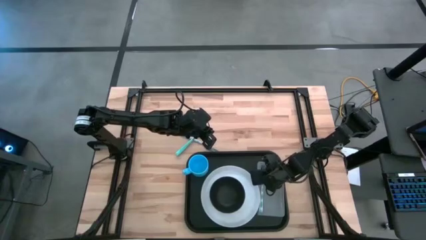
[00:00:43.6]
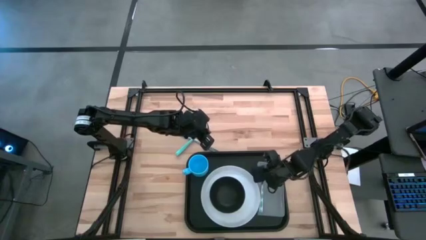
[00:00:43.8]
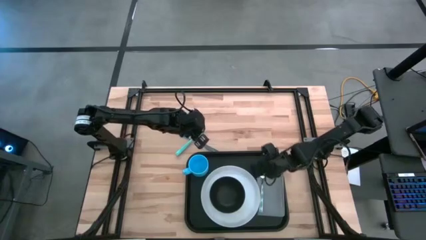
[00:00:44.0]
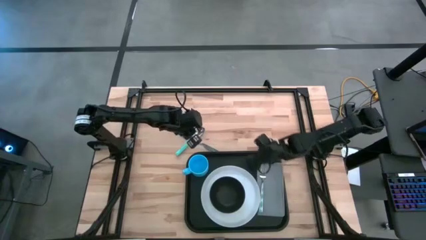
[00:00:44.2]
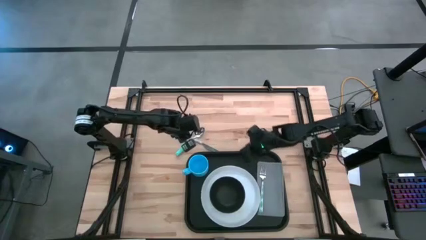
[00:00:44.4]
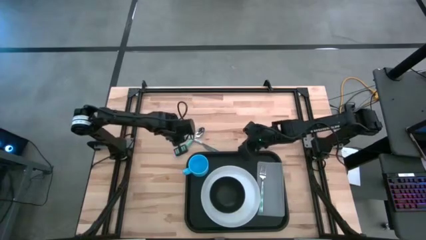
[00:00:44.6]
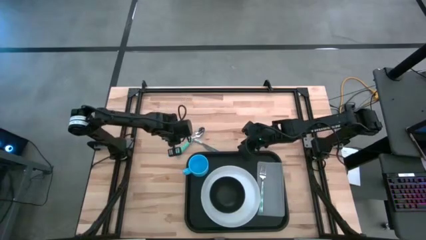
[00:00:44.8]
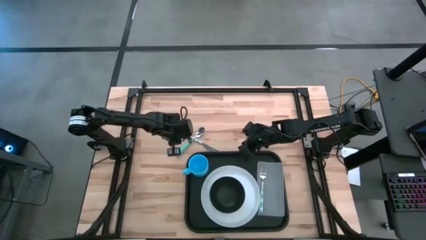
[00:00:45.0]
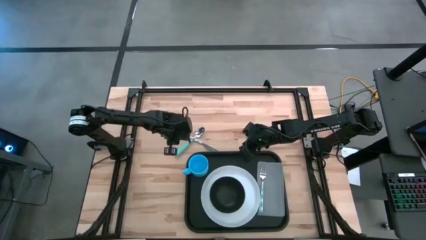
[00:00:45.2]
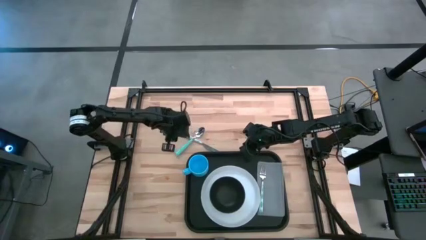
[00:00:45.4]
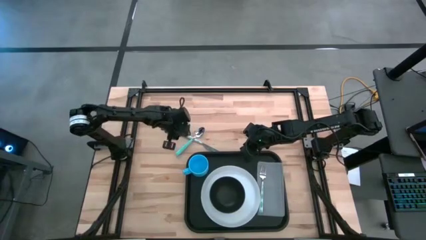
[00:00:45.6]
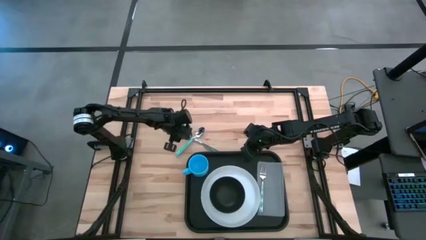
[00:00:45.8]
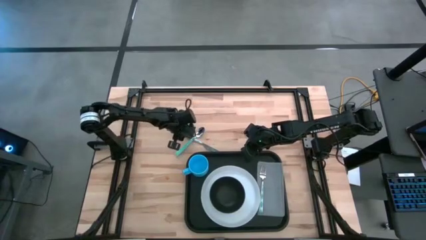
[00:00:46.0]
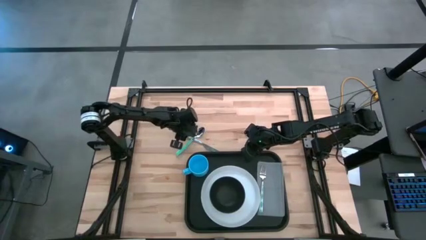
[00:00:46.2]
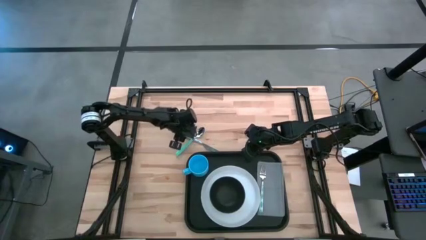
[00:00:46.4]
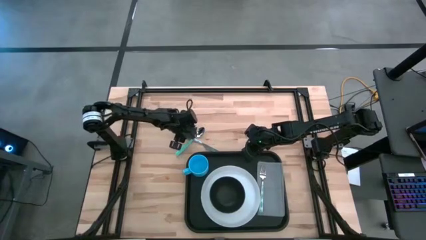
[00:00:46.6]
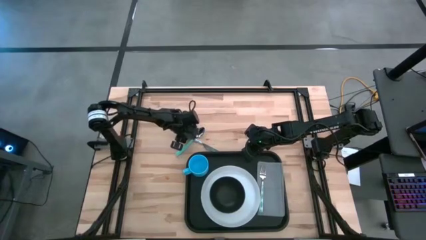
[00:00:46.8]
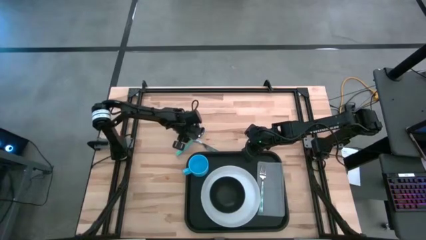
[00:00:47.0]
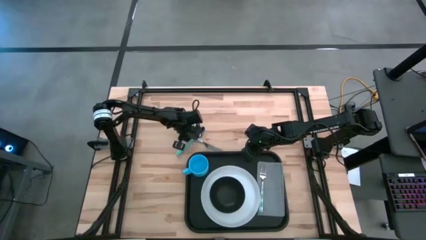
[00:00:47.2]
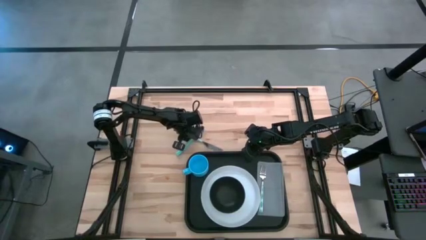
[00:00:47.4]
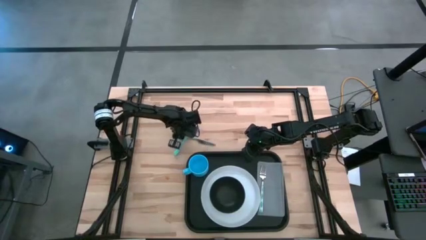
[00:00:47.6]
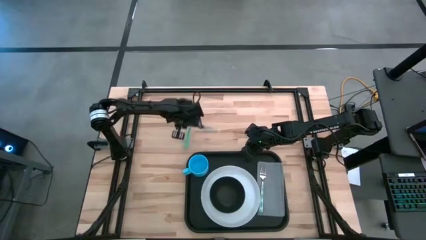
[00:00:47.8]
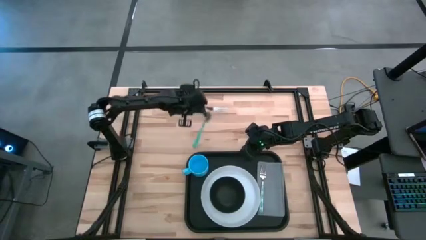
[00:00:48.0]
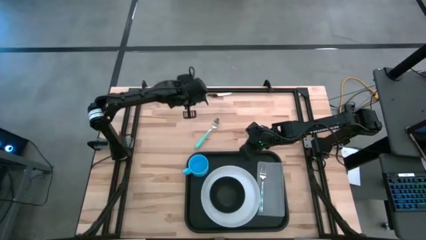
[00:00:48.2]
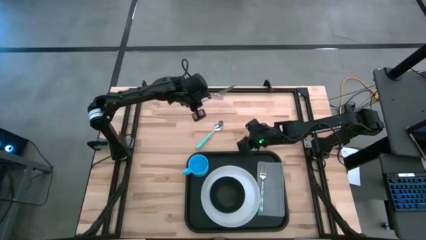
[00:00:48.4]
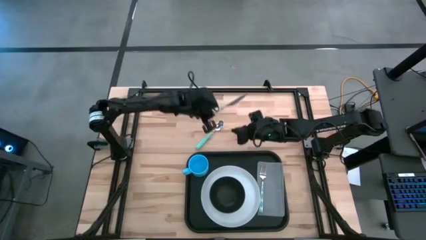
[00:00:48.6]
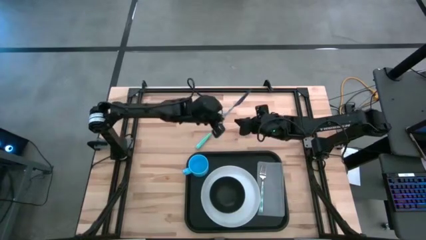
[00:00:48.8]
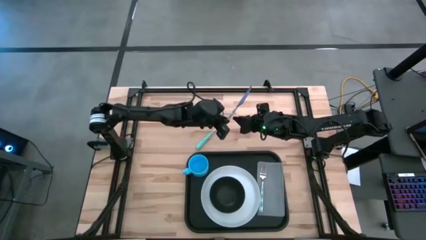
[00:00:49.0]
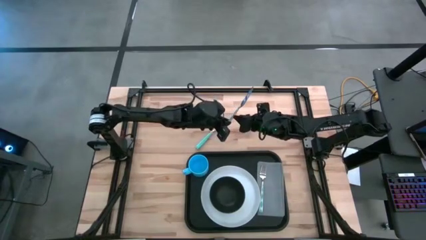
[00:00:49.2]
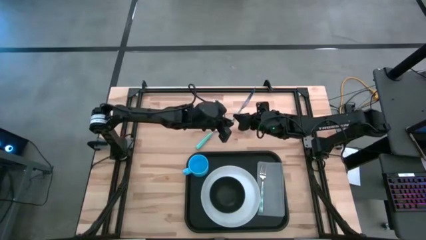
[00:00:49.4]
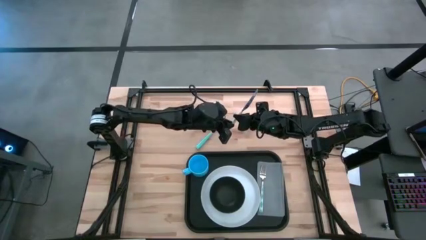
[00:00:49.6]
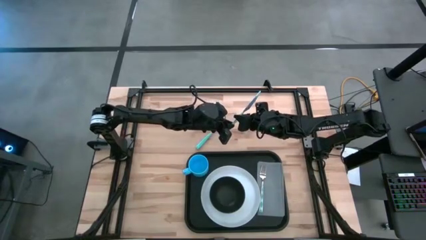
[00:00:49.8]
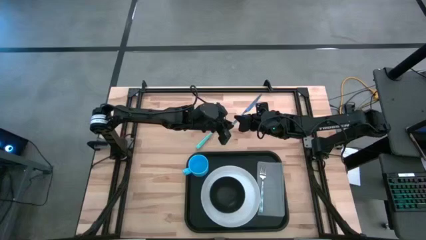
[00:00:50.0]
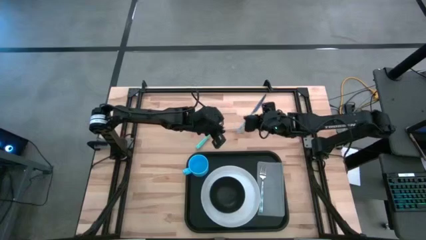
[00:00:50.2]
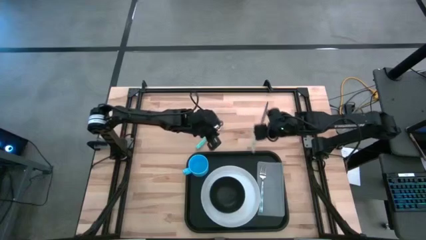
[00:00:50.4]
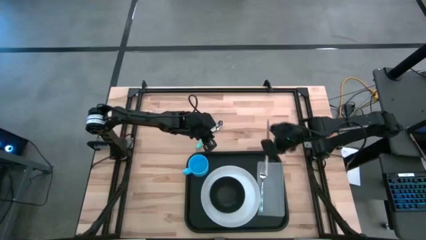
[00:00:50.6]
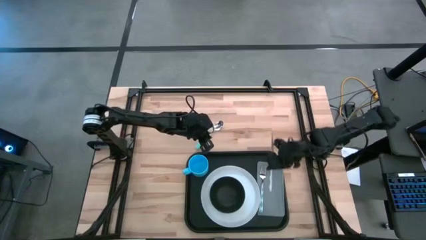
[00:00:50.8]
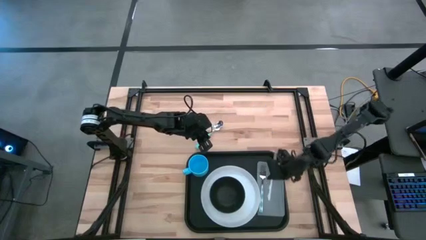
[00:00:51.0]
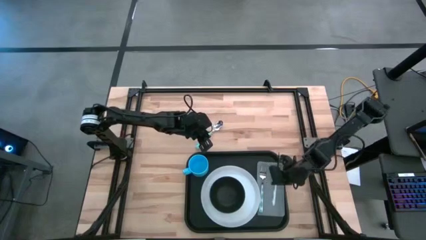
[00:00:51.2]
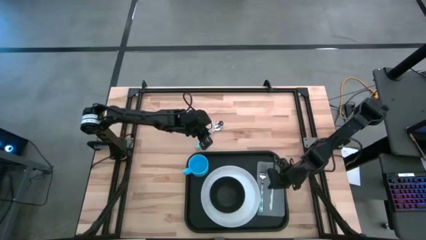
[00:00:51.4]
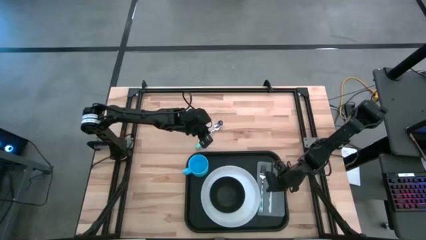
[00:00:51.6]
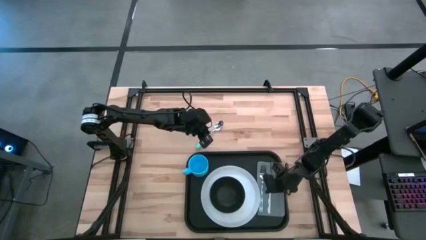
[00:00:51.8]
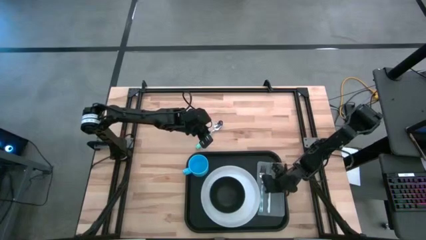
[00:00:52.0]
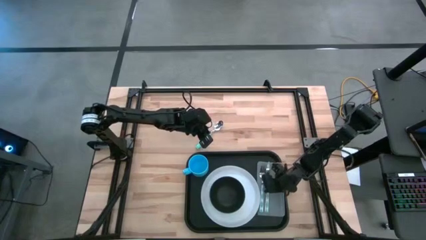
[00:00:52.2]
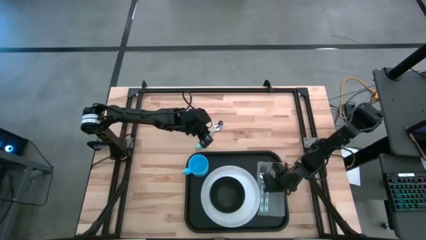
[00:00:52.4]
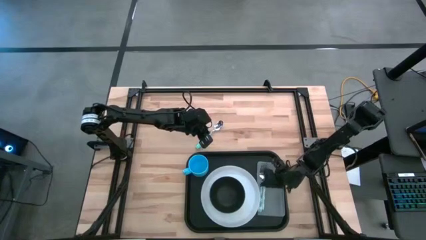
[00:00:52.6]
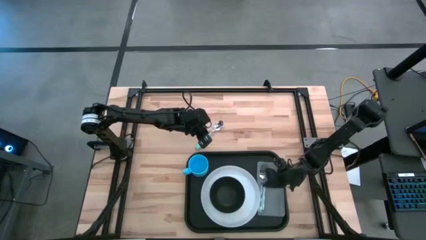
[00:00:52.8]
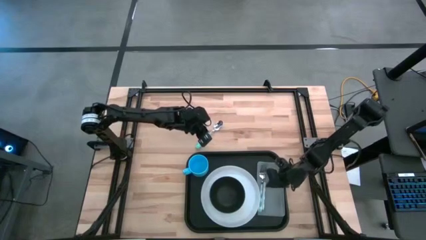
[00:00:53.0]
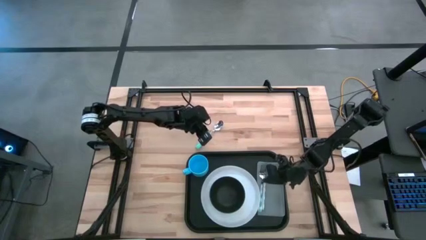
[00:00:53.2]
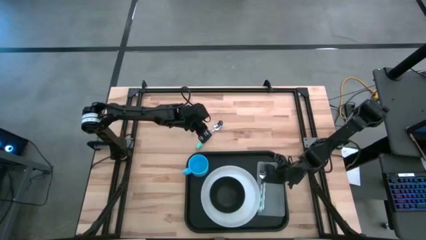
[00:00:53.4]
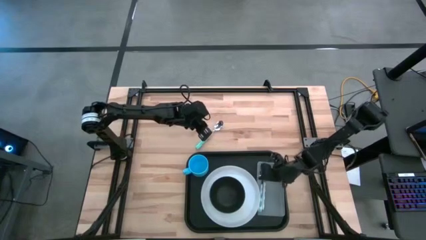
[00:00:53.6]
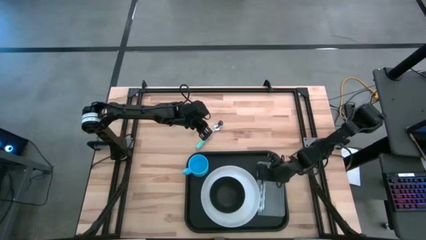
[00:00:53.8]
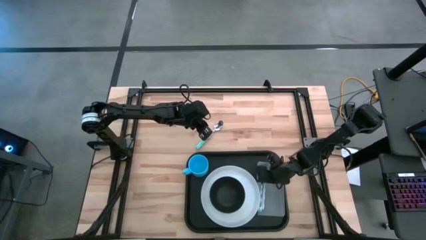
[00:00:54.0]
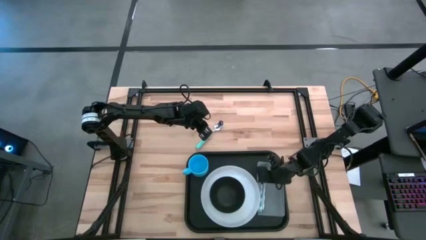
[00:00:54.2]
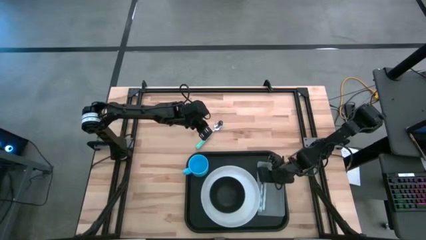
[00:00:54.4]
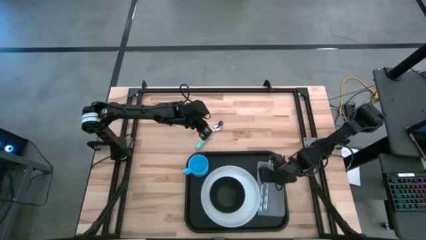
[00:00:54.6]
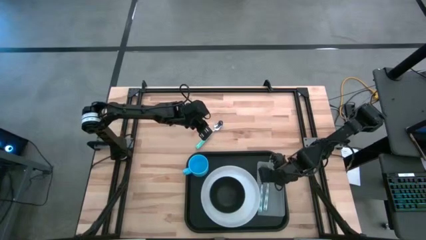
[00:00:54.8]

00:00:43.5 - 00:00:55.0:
Task: Set up tray
Put the blue green knife on the gray napkin to the right side of the blue green fork

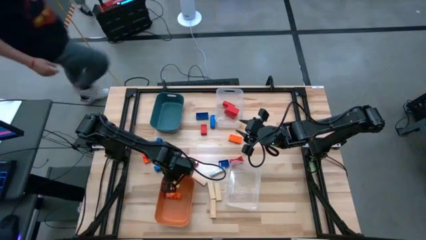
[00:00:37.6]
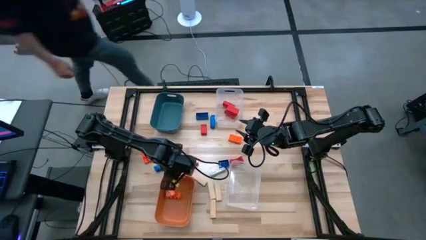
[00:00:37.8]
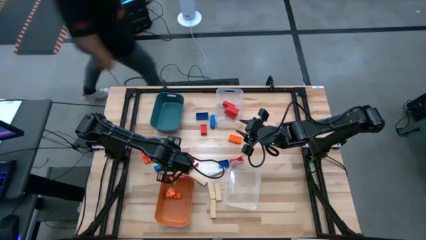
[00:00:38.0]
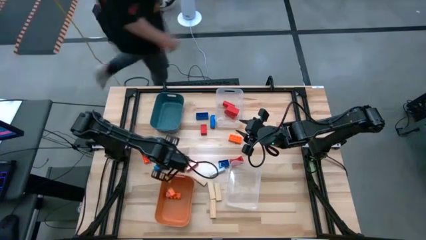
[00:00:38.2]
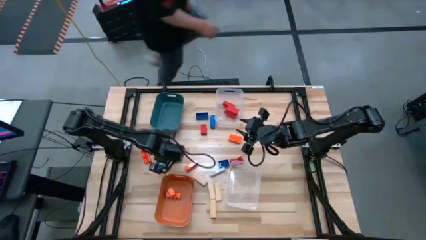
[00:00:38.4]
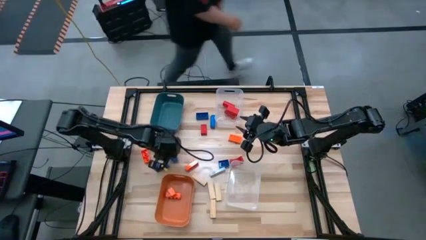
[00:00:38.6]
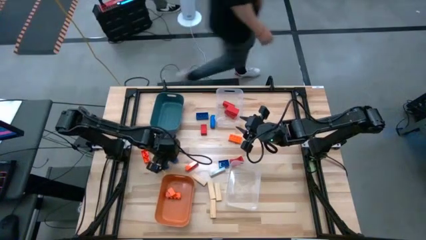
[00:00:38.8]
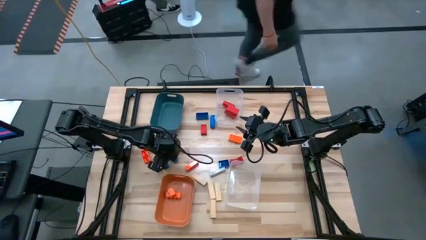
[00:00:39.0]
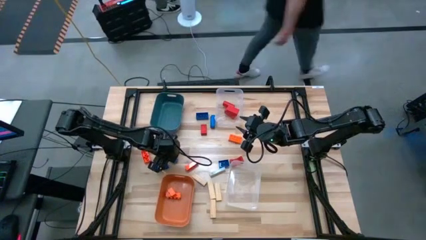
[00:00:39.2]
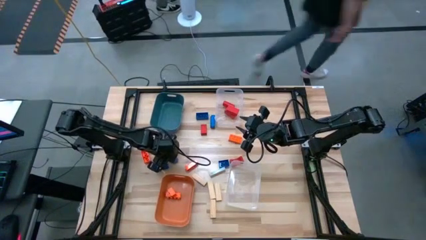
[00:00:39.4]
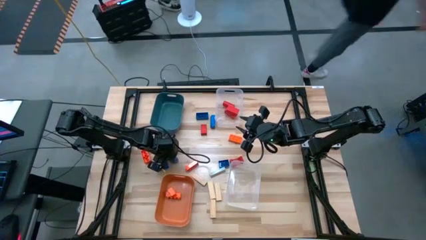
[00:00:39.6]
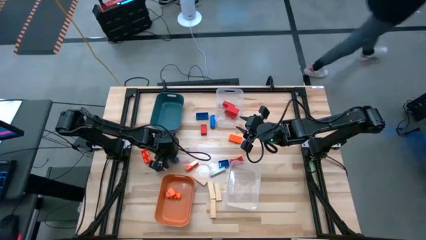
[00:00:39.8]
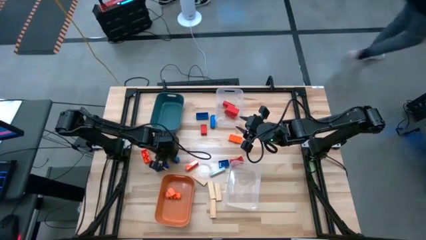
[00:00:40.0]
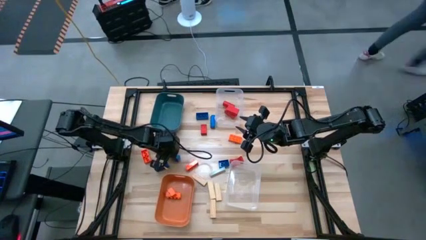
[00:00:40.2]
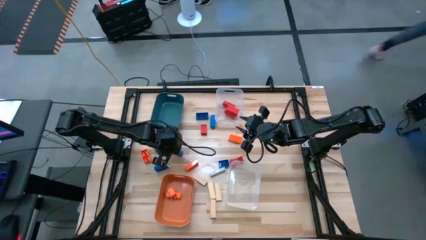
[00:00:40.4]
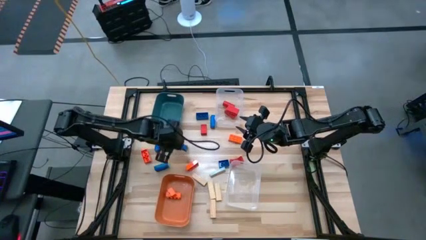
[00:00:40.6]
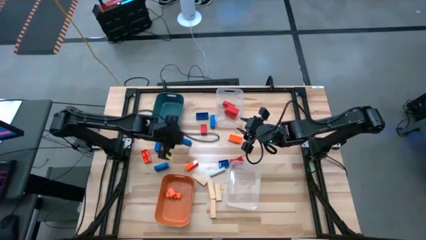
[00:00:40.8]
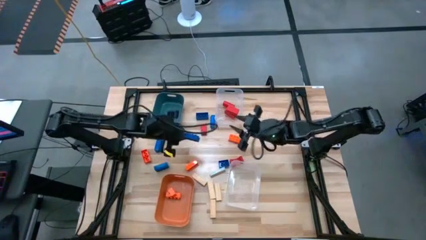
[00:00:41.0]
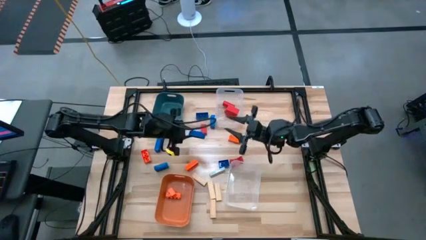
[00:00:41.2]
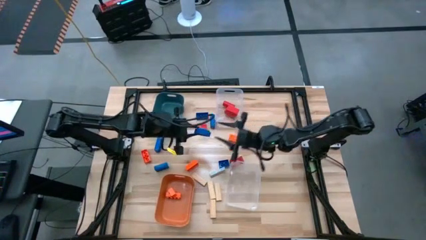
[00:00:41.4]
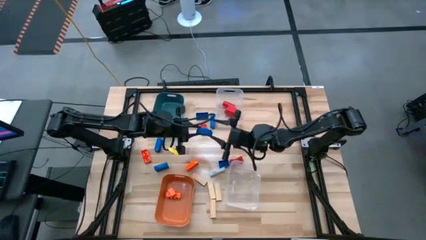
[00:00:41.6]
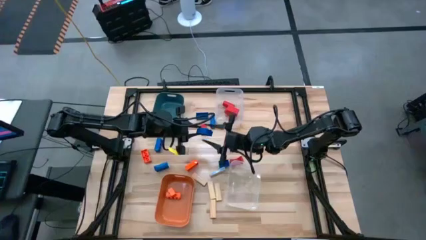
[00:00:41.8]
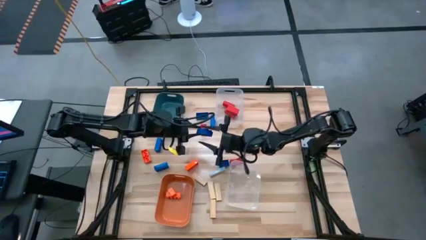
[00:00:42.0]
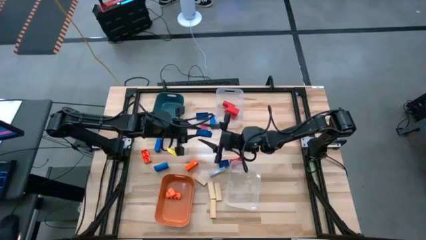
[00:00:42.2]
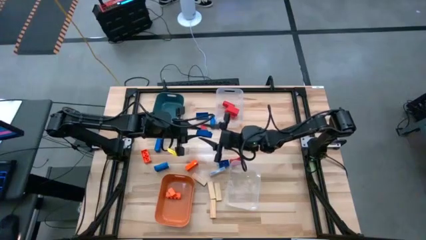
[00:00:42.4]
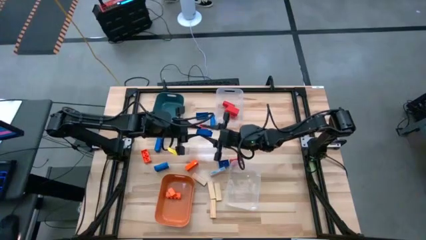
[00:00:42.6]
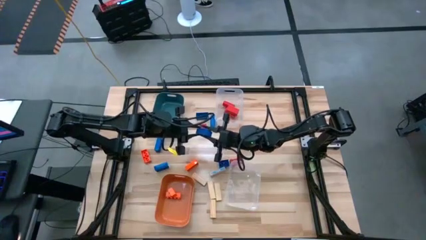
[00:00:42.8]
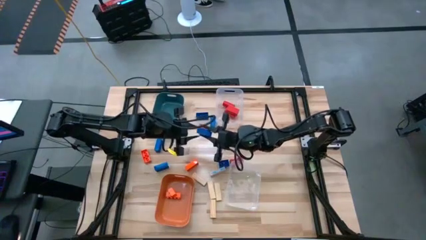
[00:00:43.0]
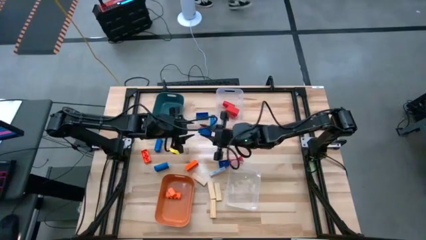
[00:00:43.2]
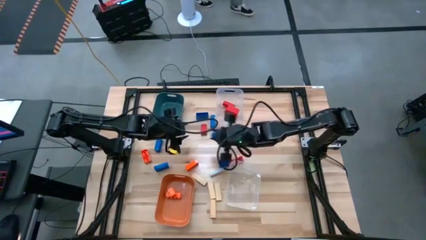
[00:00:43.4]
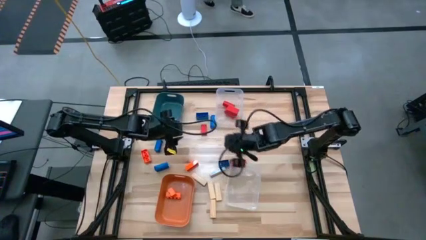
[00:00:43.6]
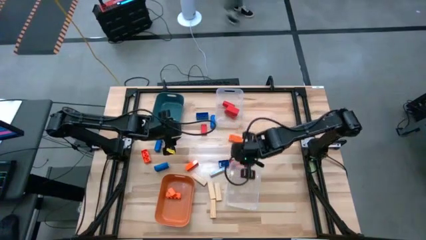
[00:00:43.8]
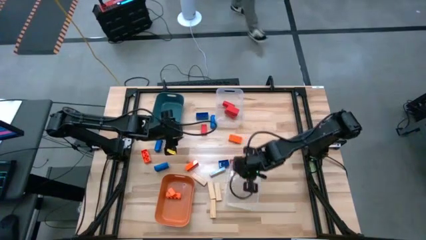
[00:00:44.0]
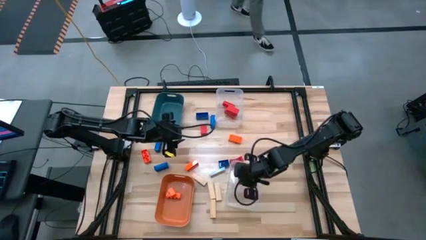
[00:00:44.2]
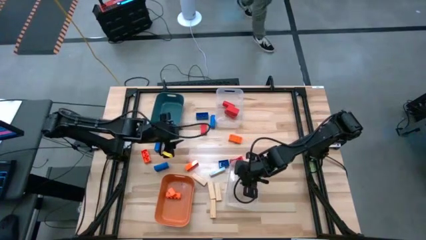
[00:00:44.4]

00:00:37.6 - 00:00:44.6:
Task: Sort blocks
Put the blue game piece into the bottom transparent bin
